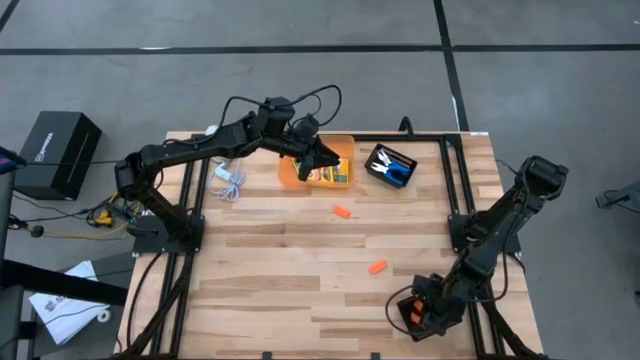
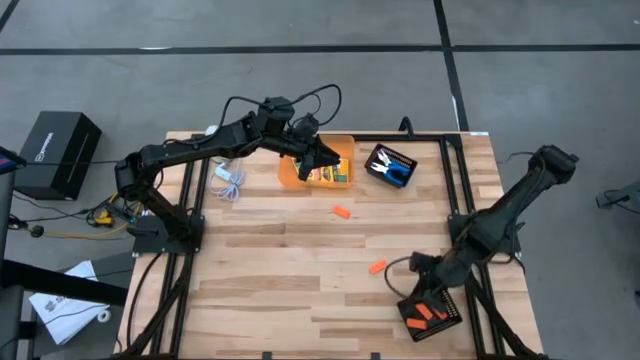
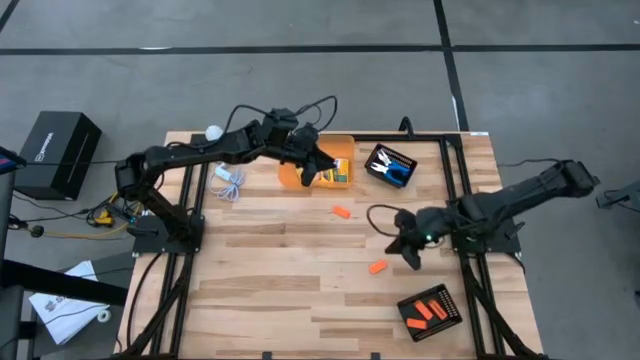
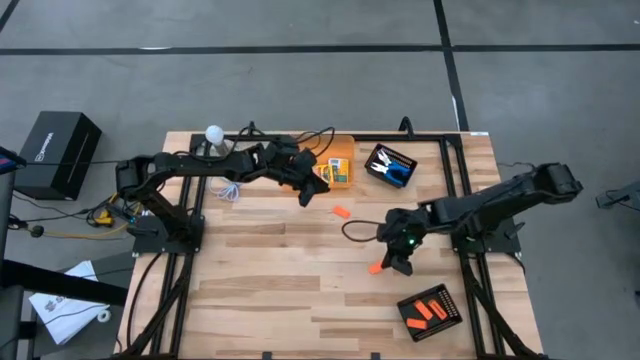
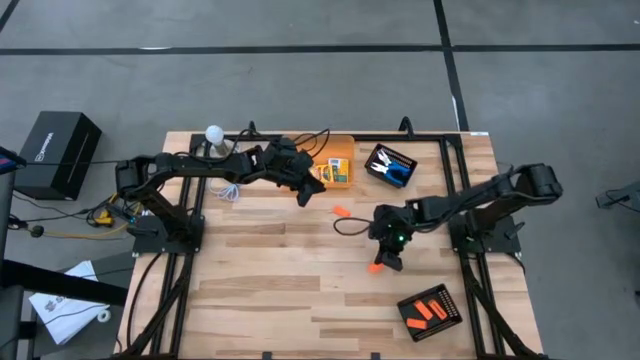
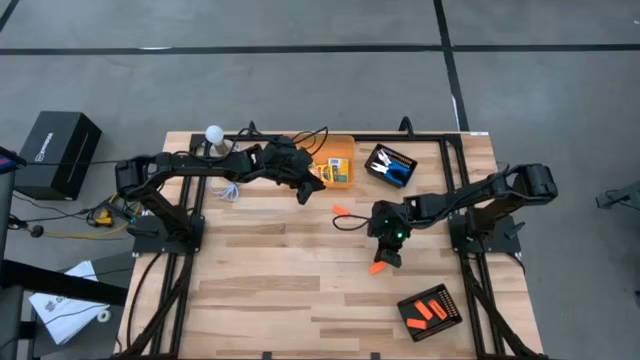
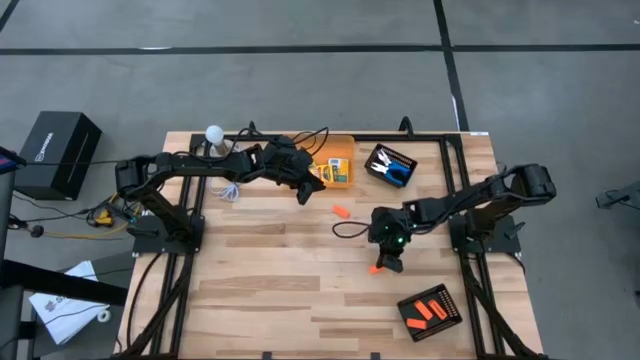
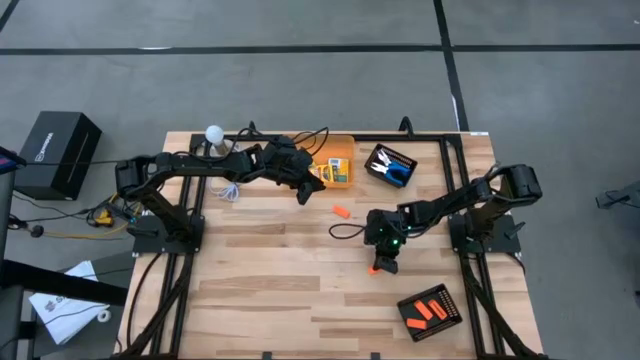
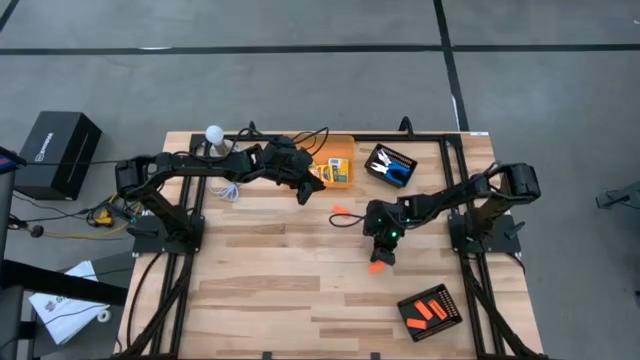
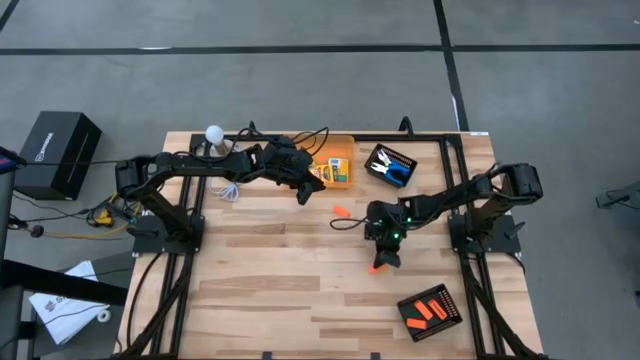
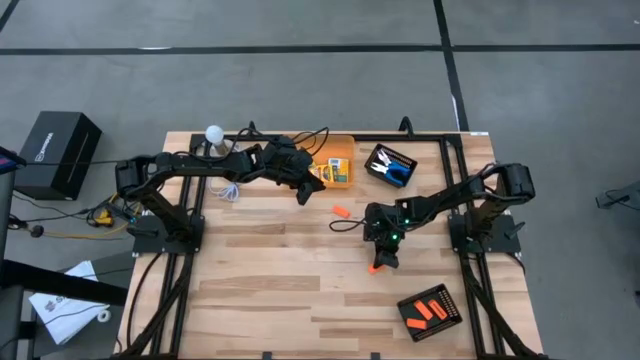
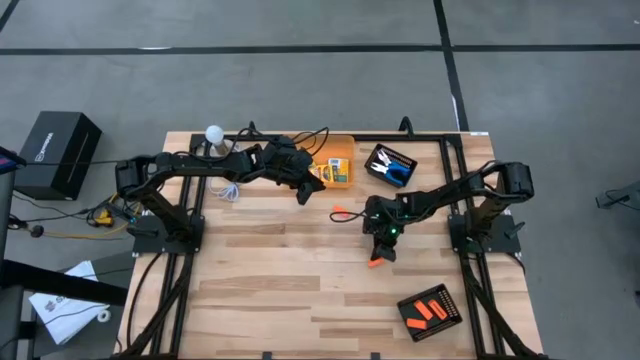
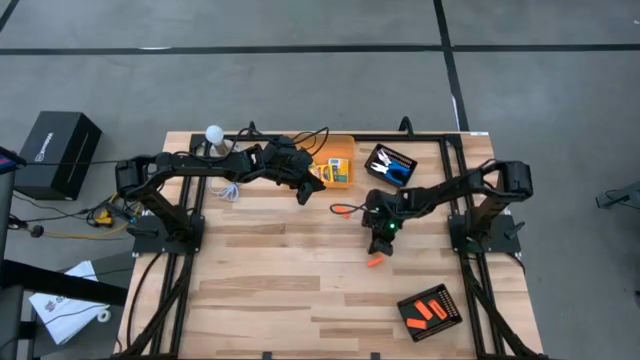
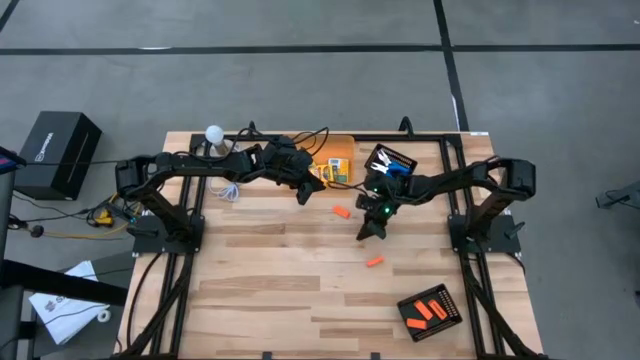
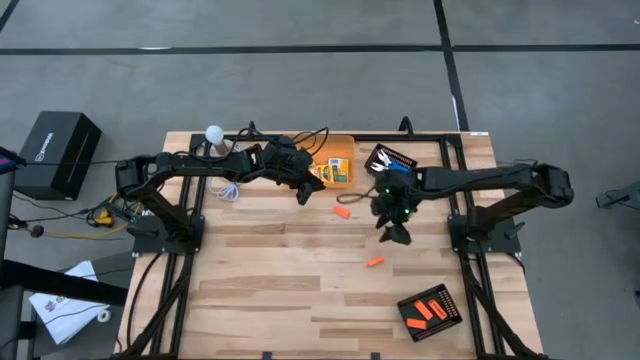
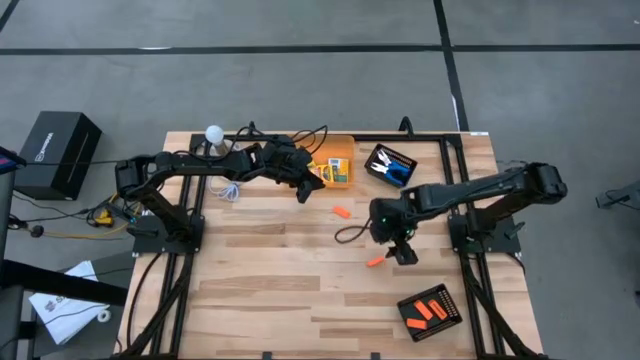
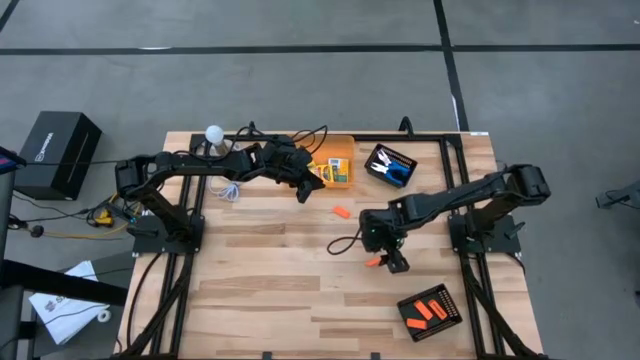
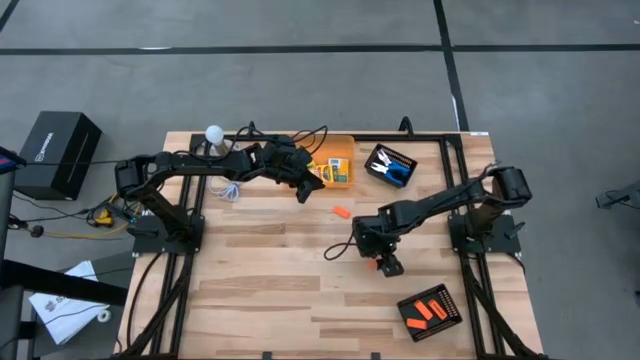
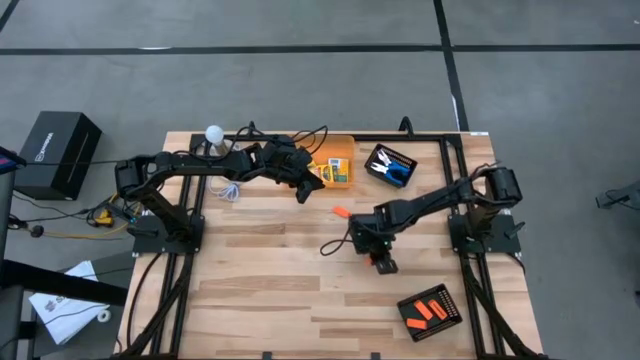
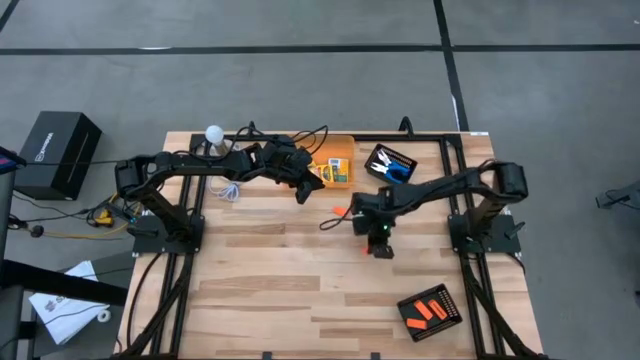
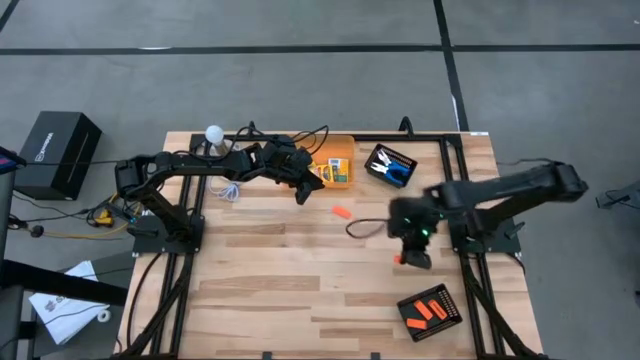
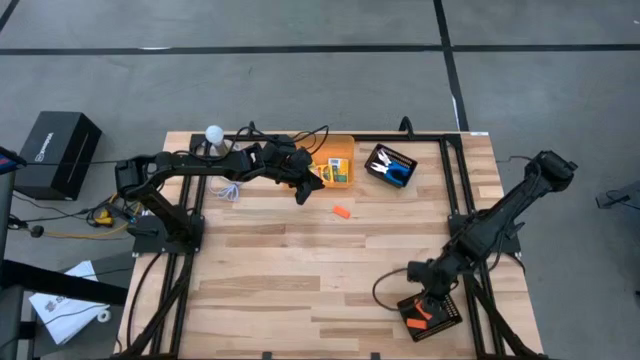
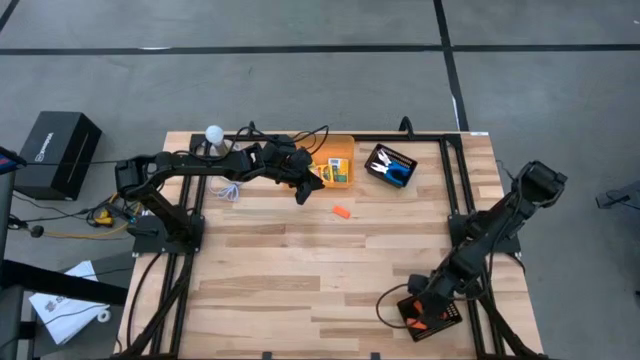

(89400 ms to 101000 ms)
Task: Pick & Place School Supplies
Put the orange eraser into the bottom black bin

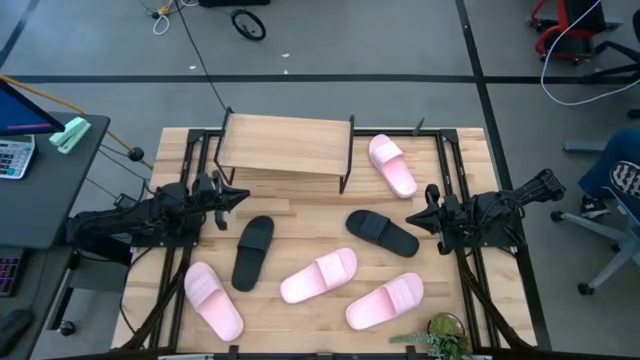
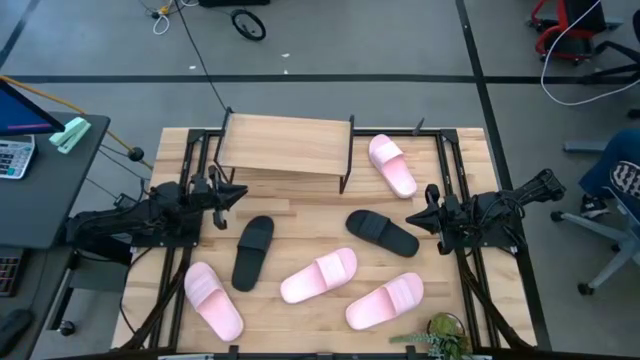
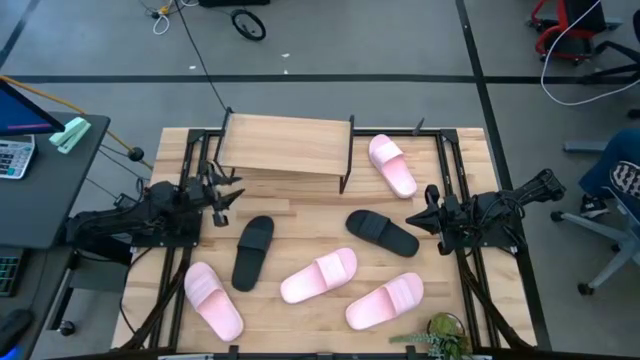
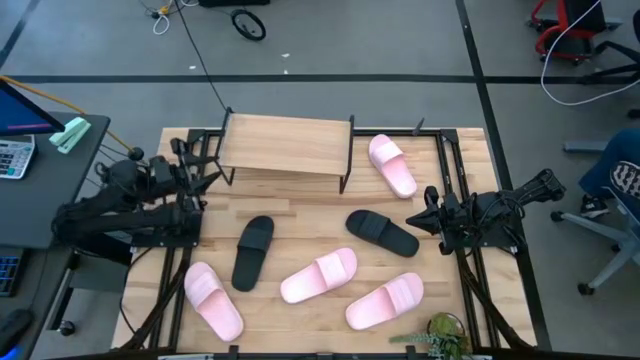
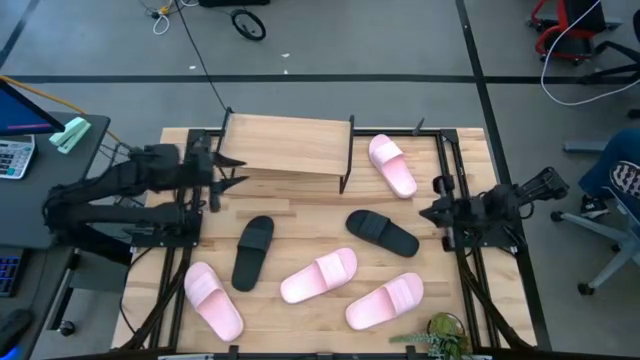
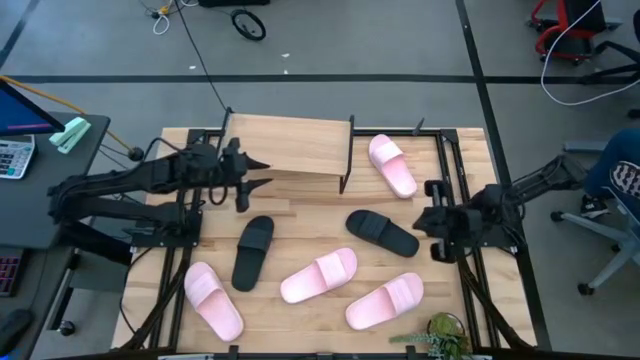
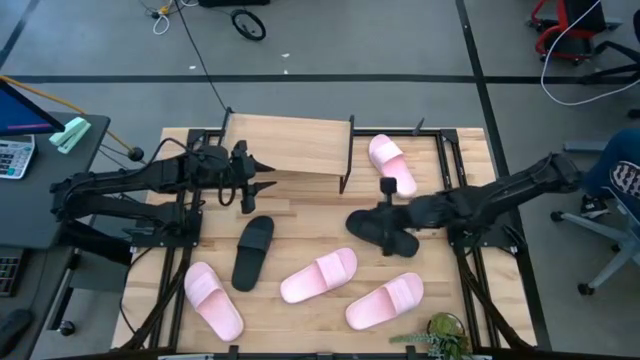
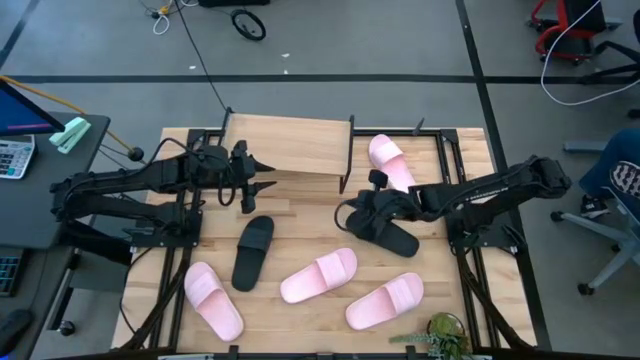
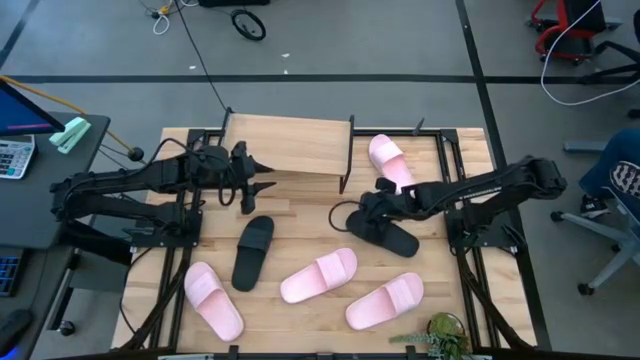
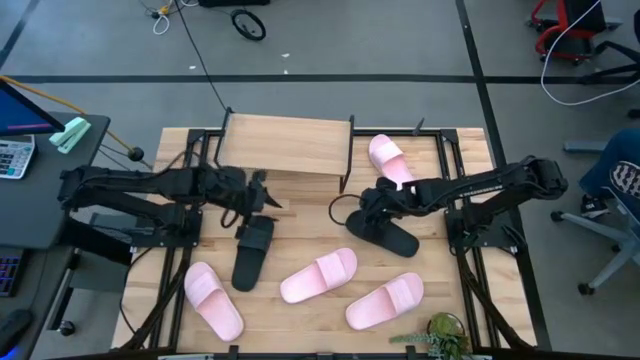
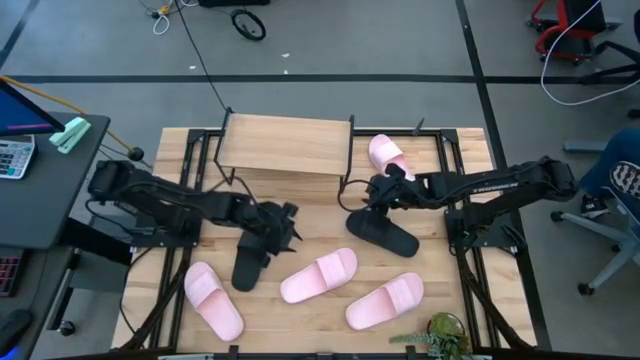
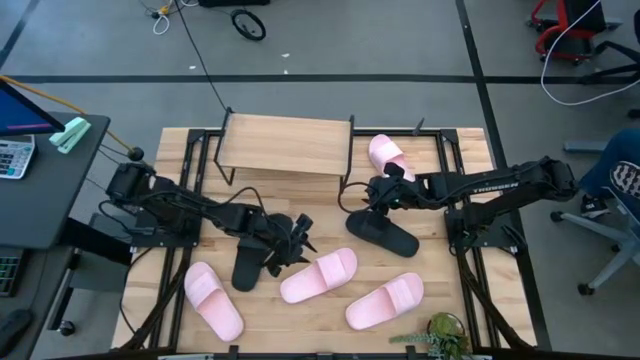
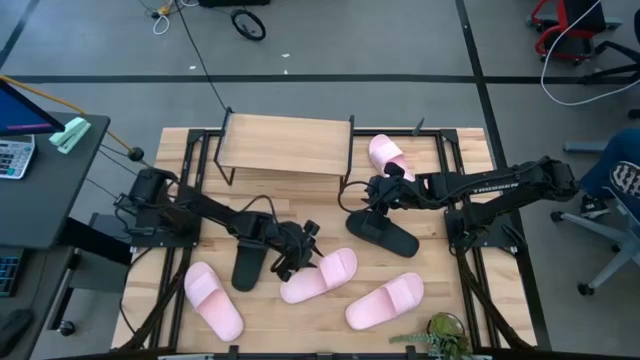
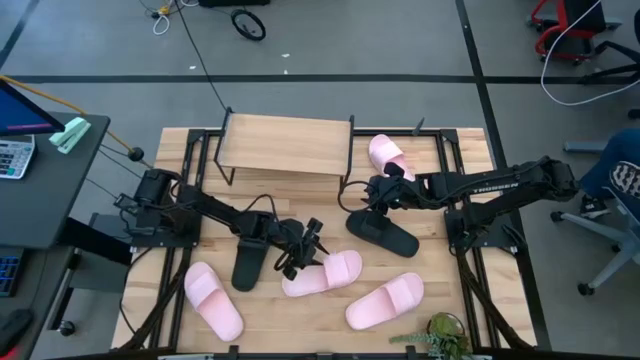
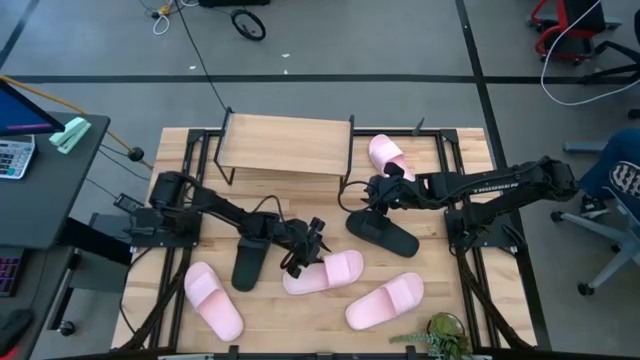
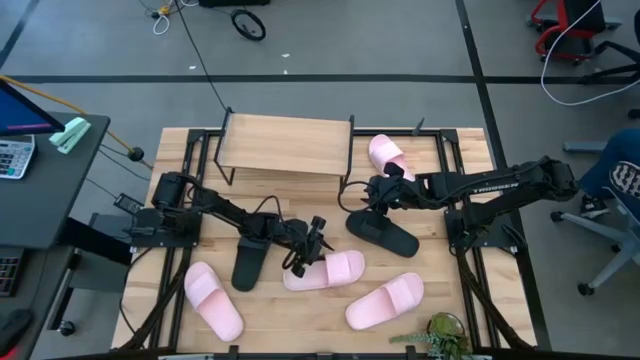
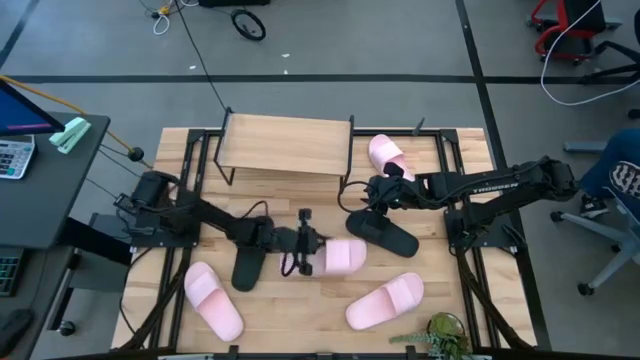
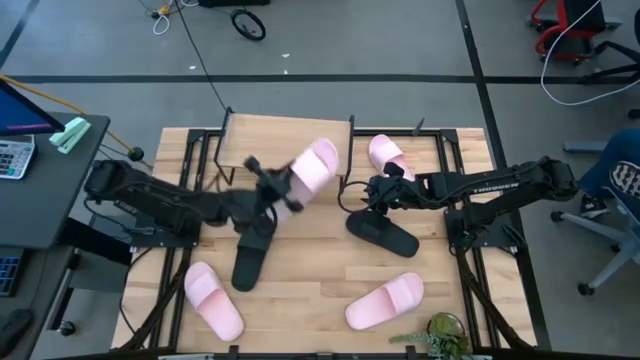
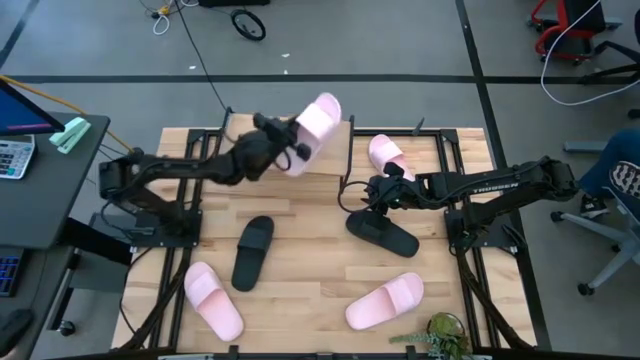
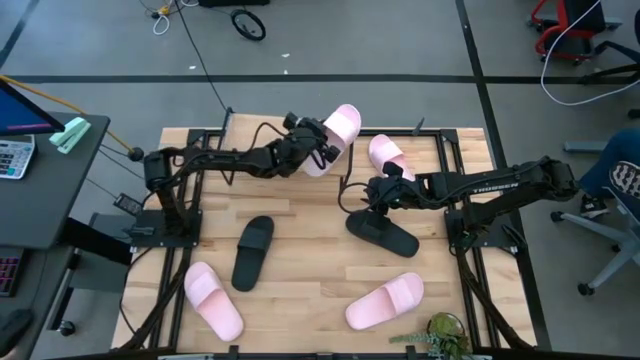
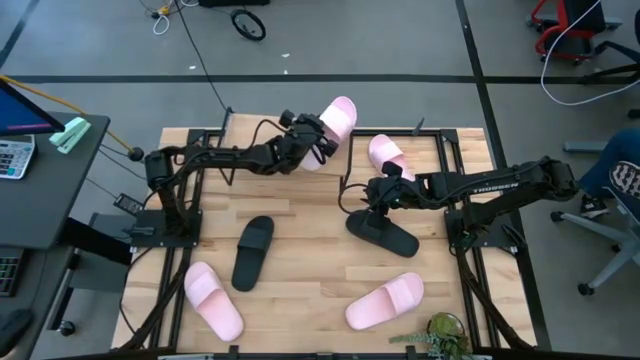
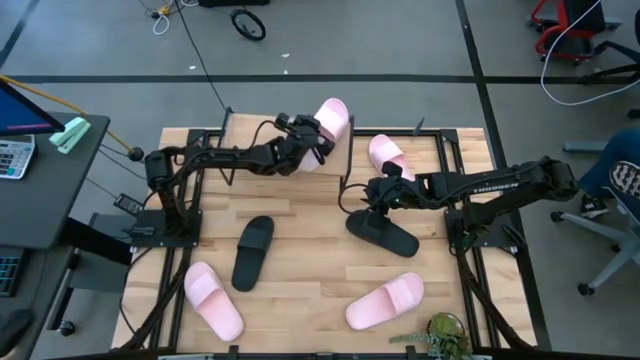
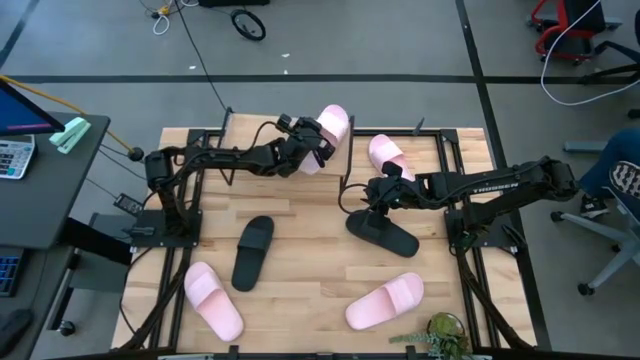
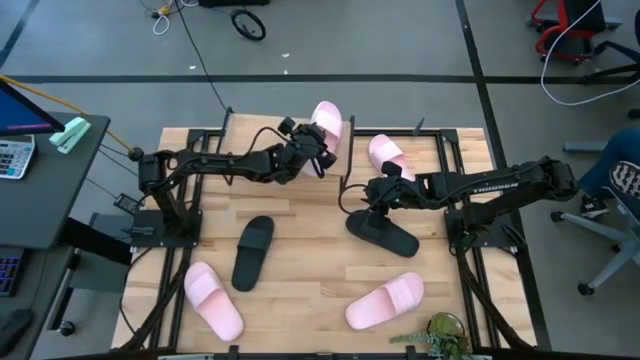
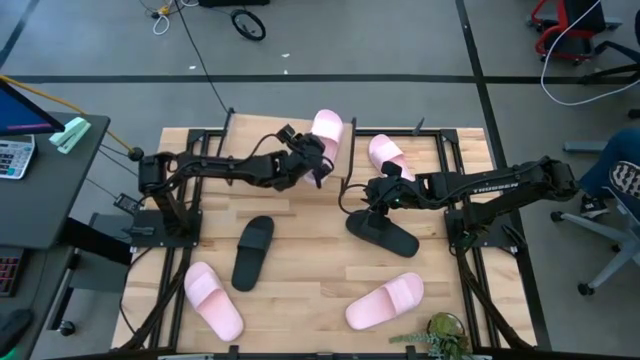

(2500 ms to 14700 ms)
Task: Pick and place slides into the shelf
Put the pink slipper on the shelf
